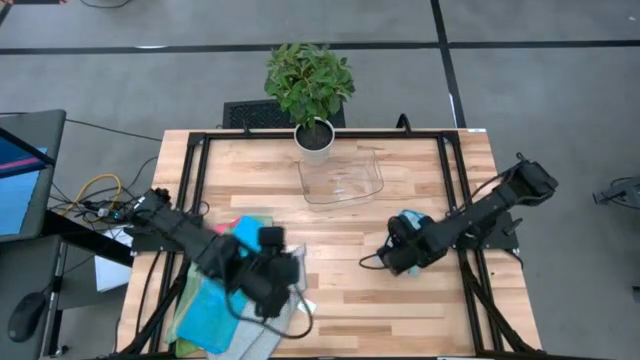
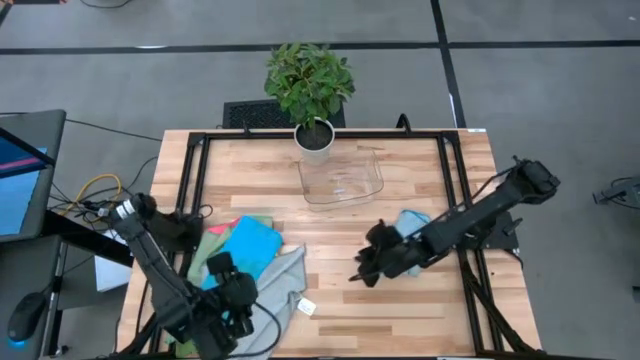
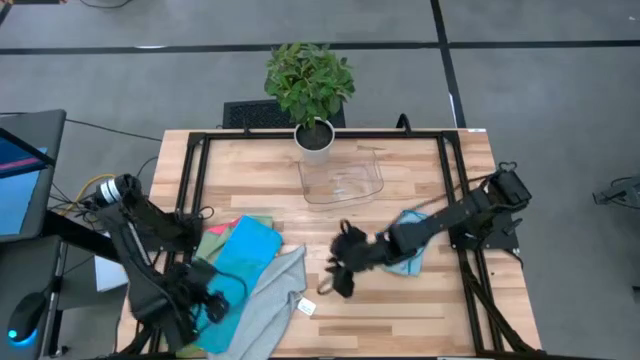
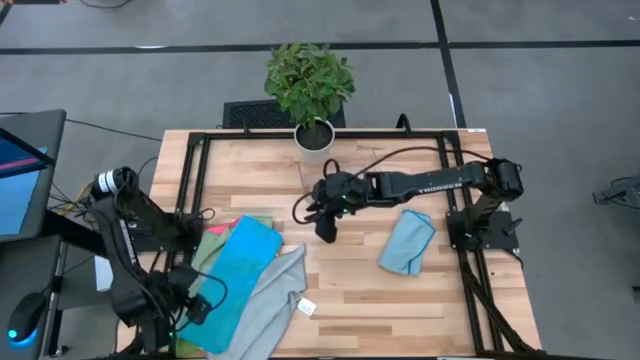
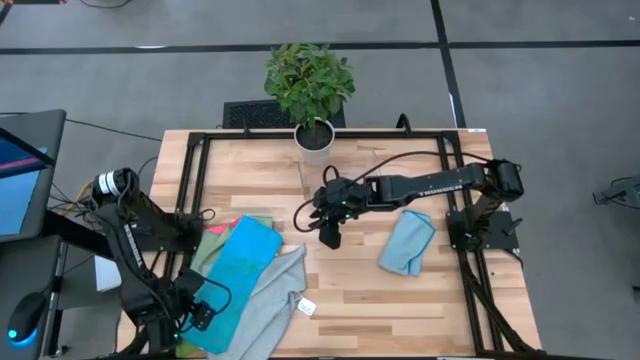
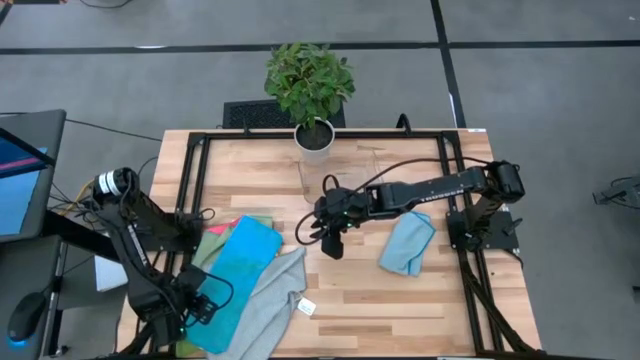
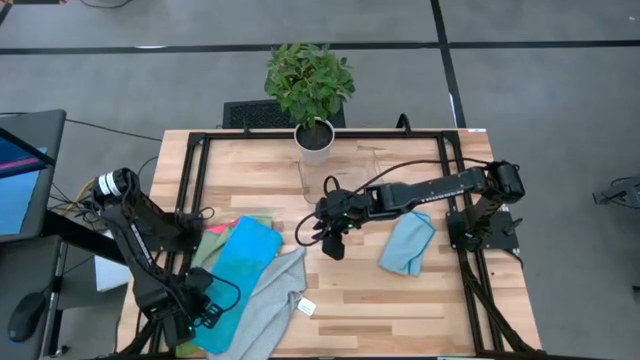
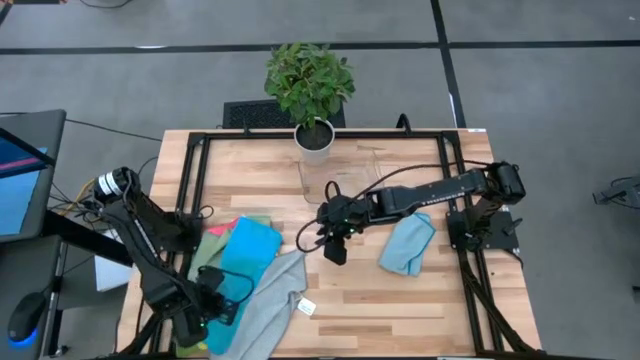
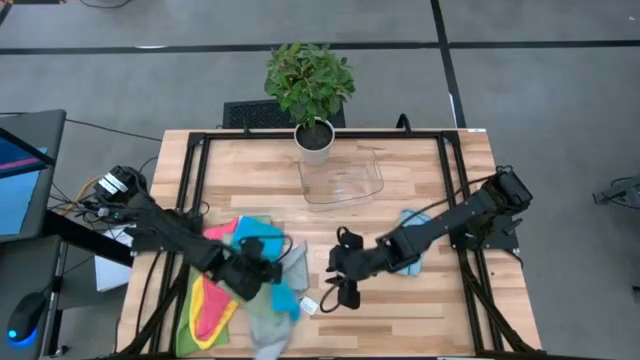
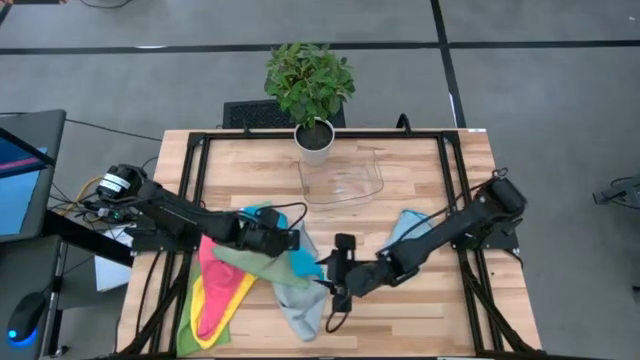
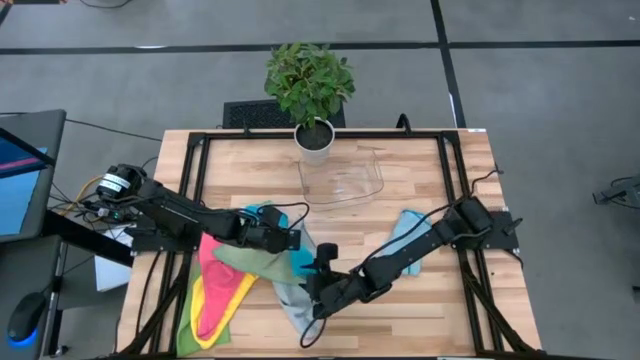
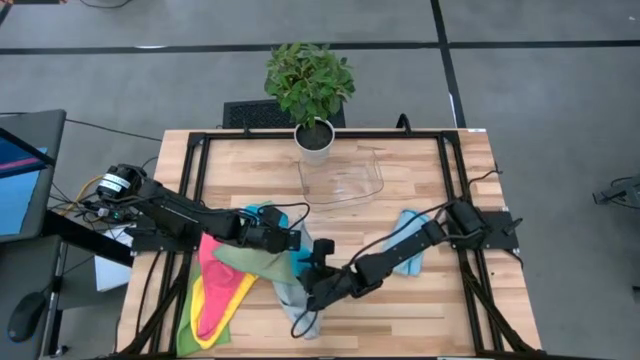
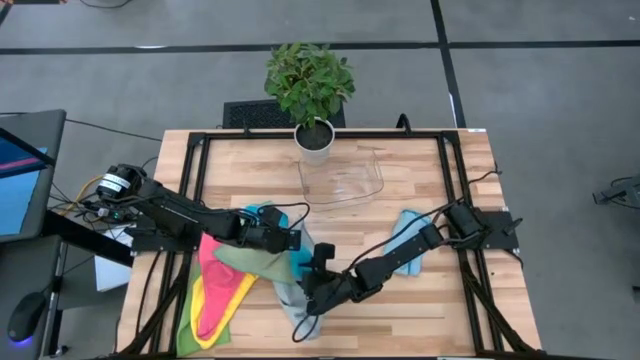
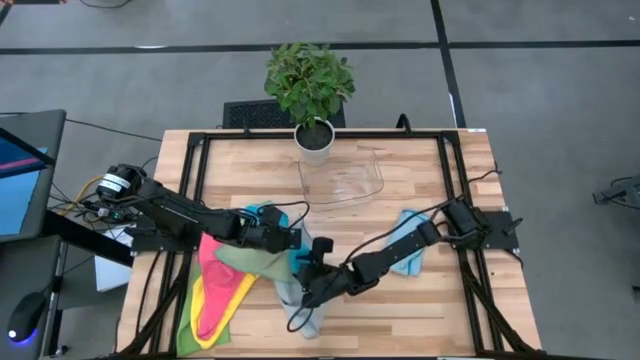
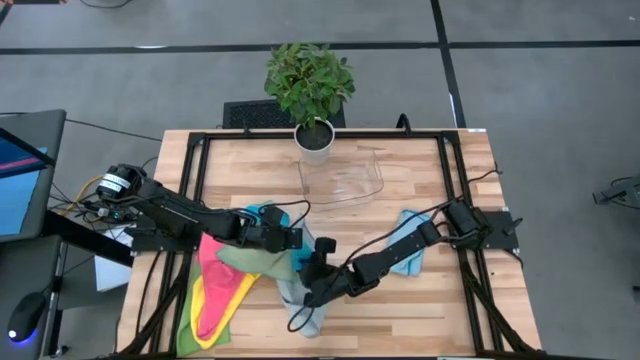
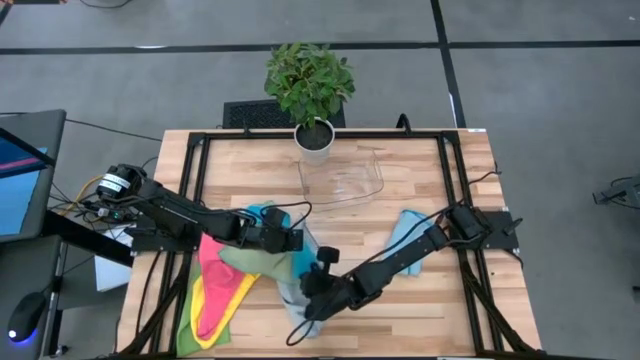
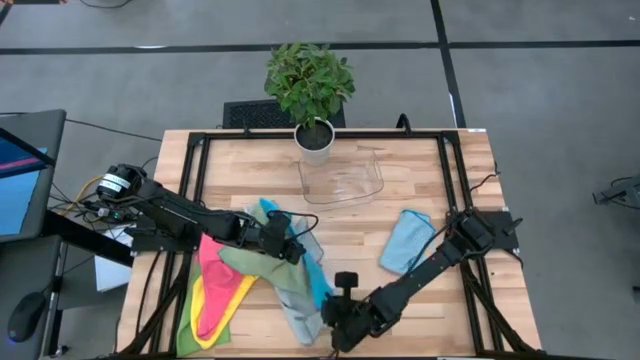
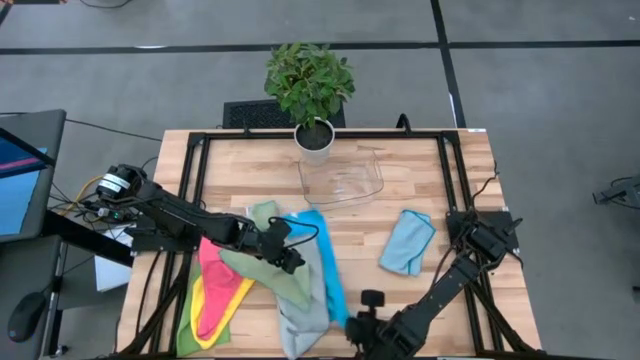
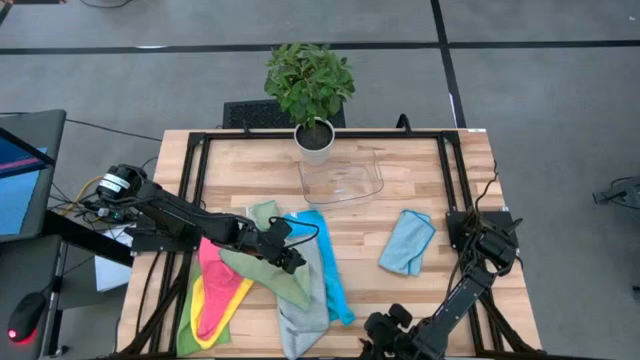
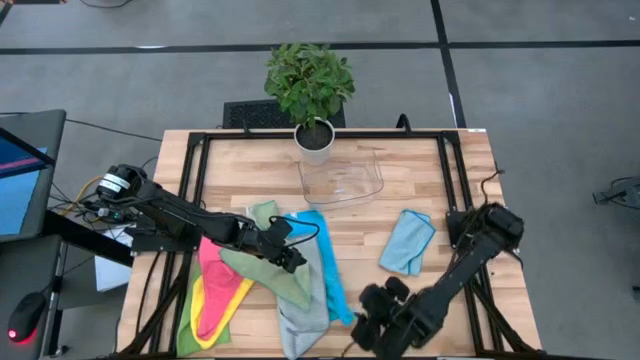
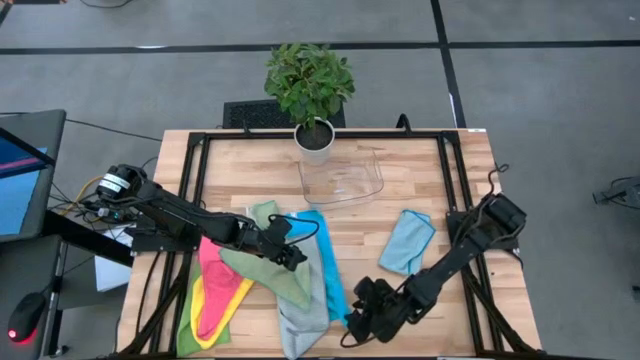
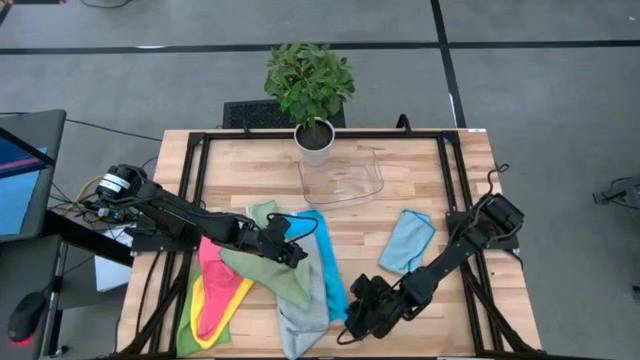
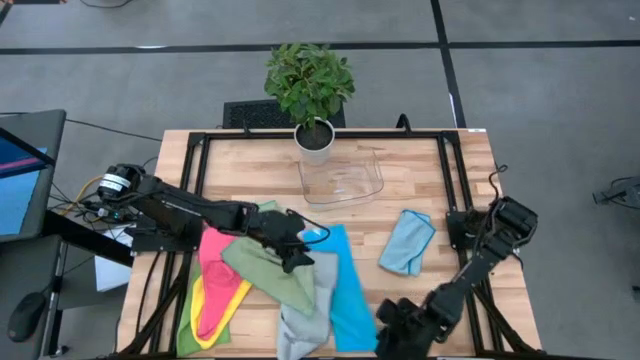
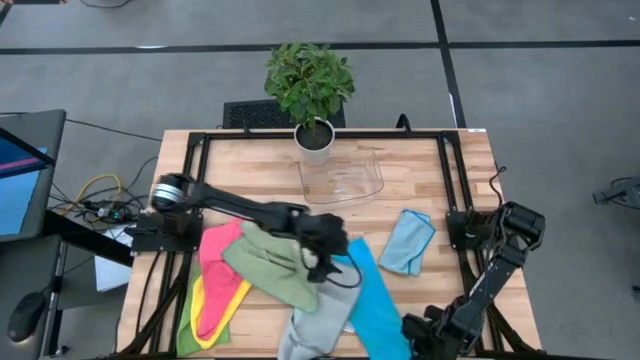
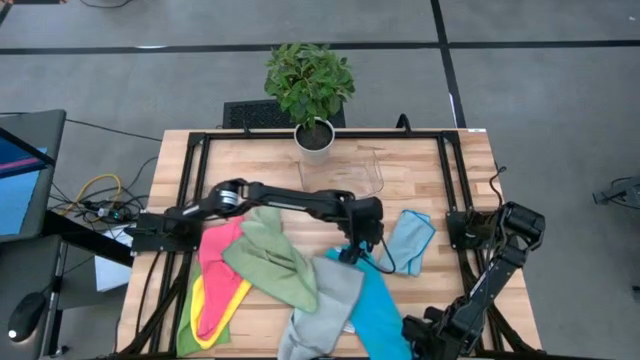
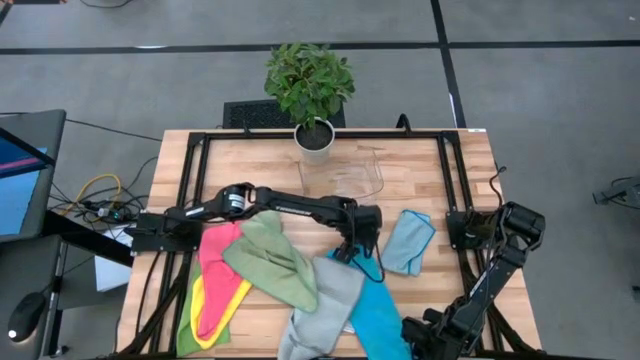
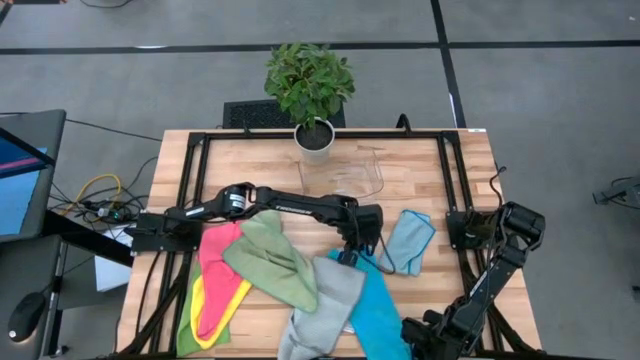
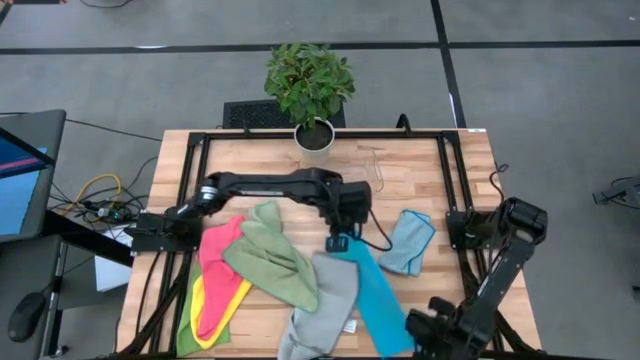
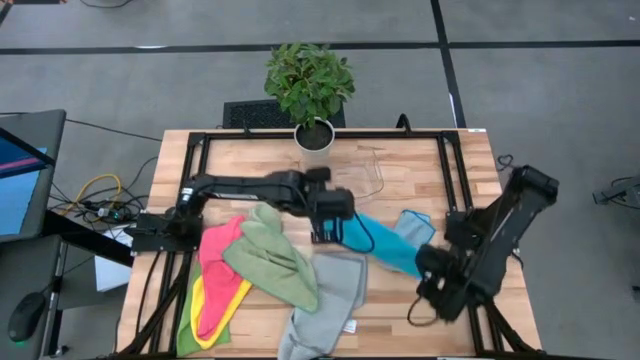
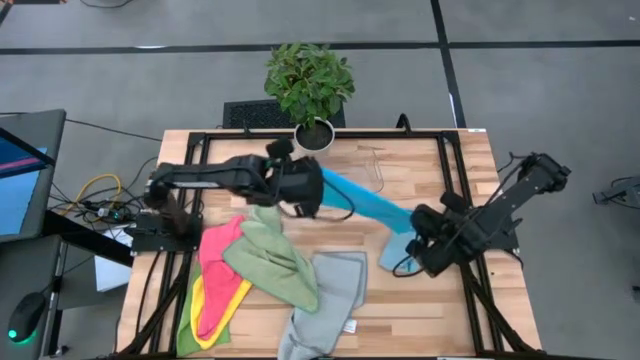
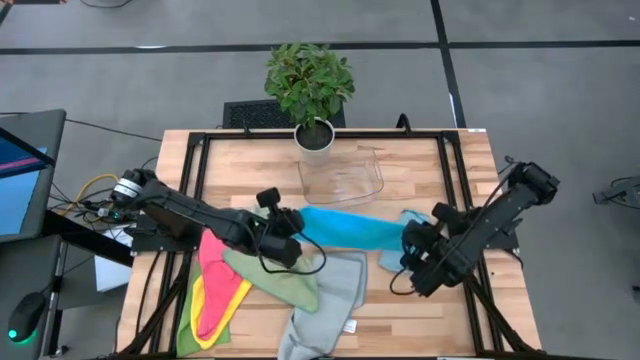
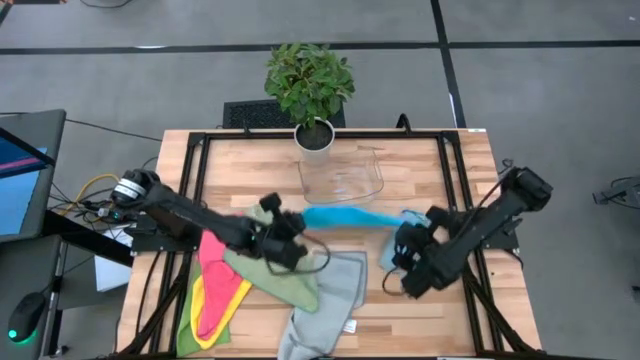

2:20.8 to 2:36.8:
Task: Fold microfiber towels
Fold the blue microfiber cloth
